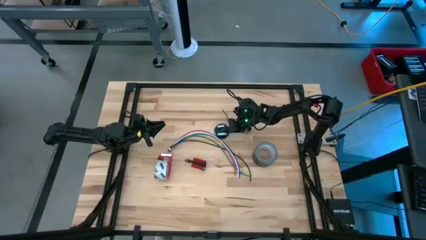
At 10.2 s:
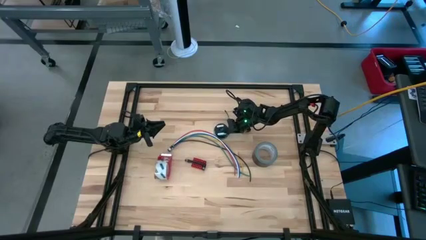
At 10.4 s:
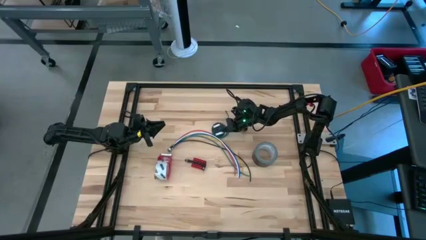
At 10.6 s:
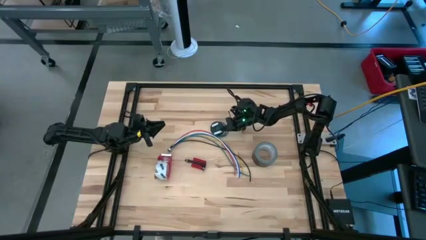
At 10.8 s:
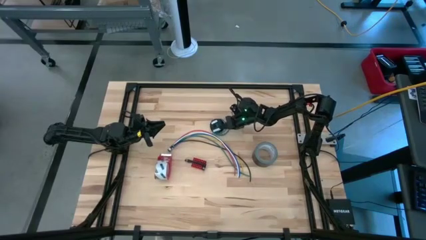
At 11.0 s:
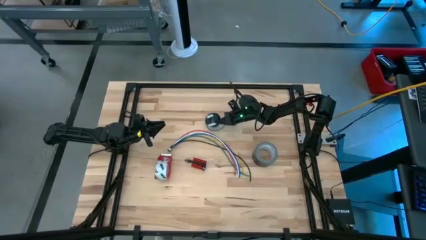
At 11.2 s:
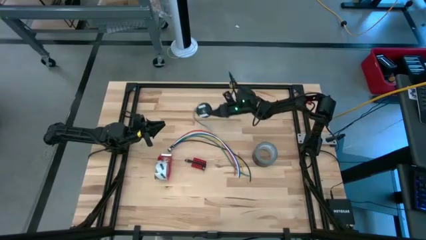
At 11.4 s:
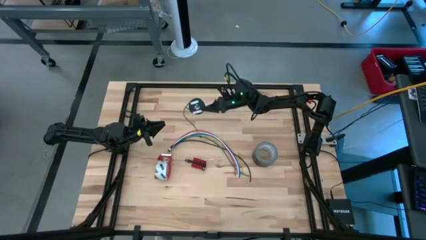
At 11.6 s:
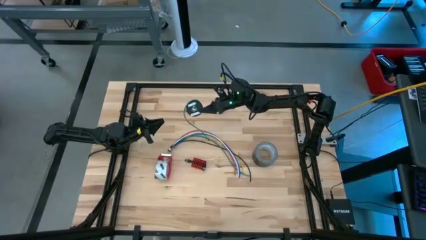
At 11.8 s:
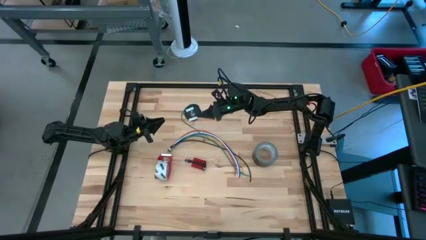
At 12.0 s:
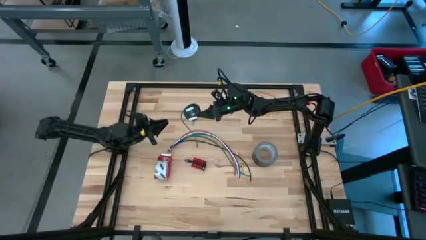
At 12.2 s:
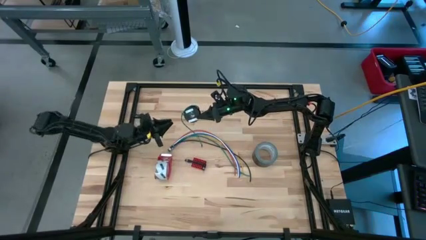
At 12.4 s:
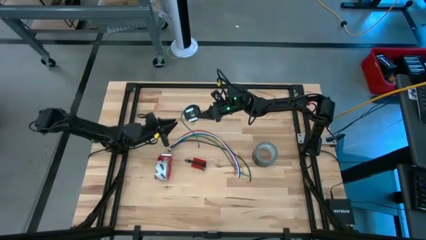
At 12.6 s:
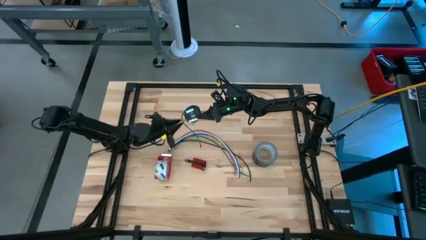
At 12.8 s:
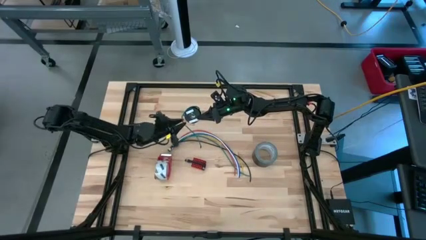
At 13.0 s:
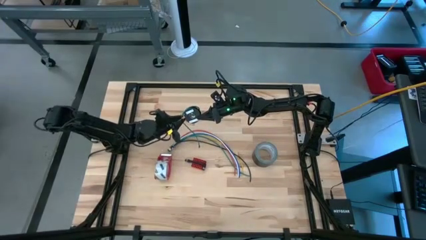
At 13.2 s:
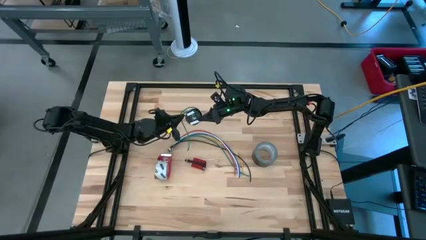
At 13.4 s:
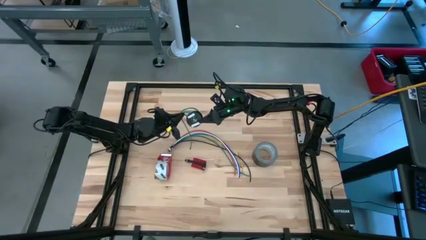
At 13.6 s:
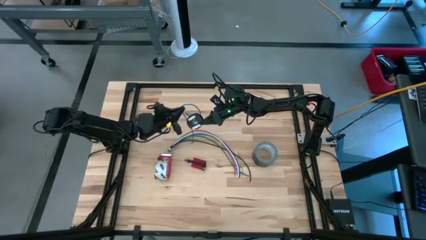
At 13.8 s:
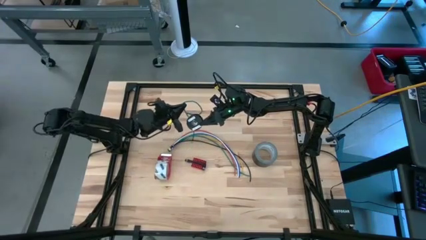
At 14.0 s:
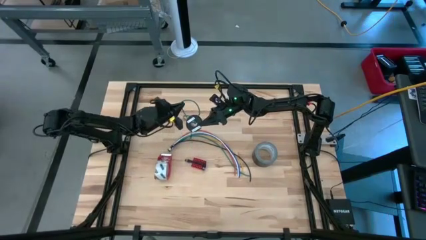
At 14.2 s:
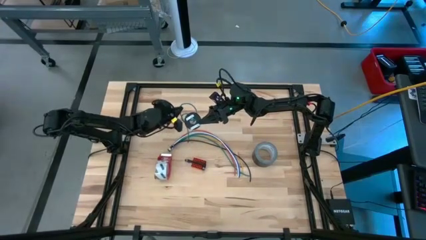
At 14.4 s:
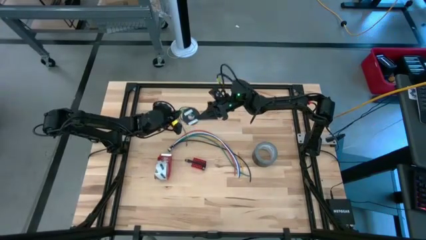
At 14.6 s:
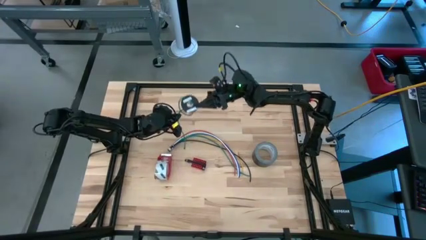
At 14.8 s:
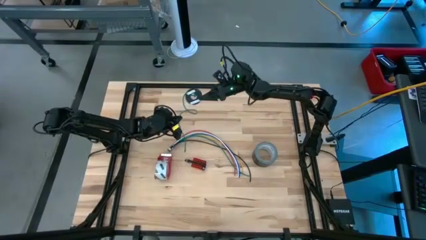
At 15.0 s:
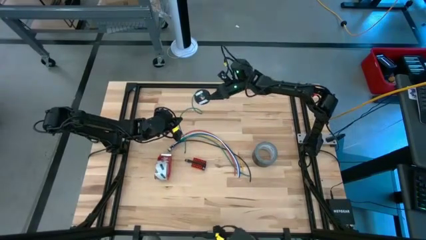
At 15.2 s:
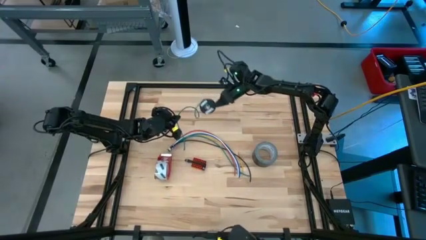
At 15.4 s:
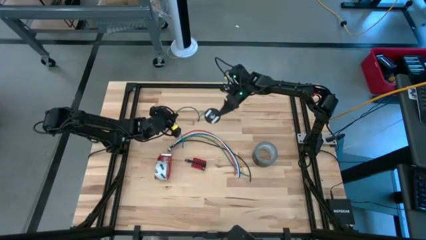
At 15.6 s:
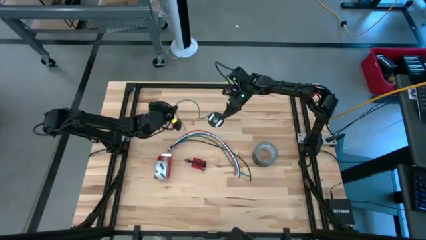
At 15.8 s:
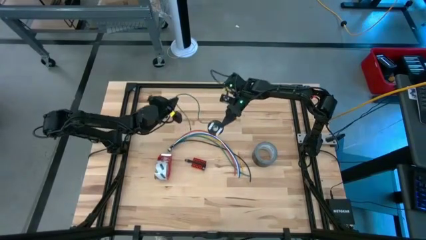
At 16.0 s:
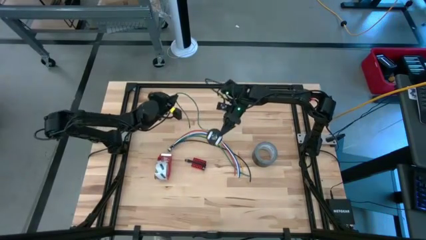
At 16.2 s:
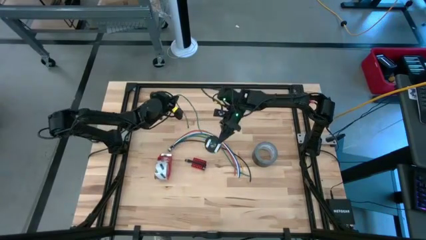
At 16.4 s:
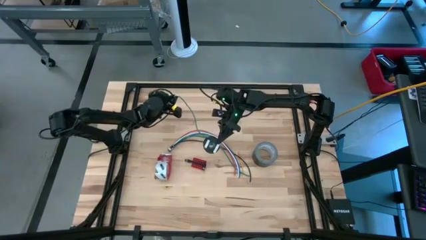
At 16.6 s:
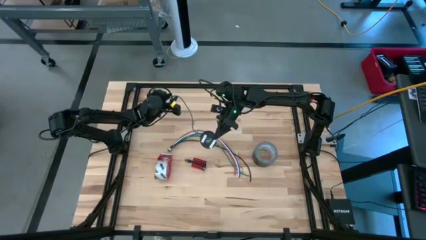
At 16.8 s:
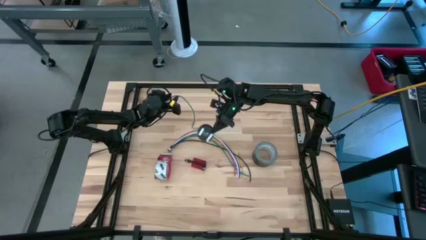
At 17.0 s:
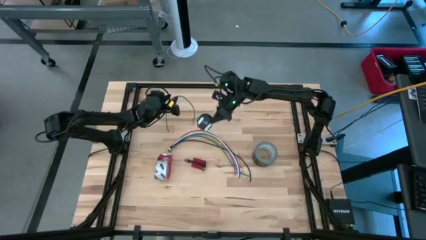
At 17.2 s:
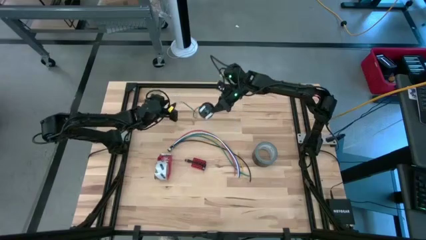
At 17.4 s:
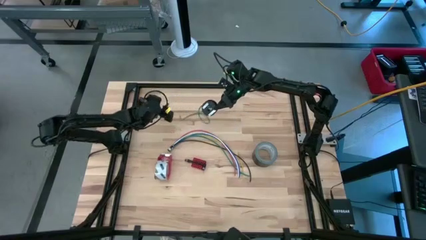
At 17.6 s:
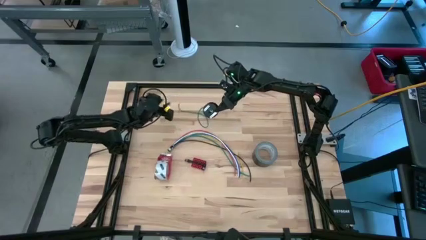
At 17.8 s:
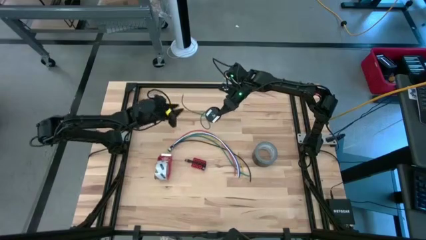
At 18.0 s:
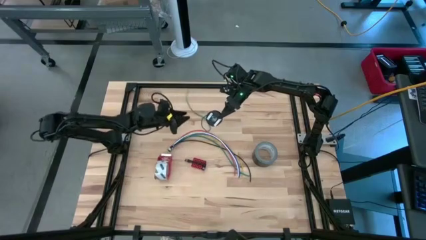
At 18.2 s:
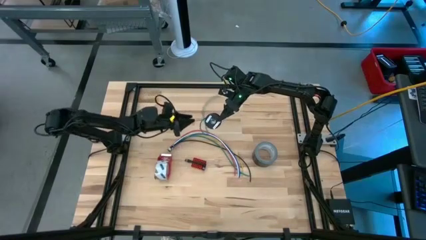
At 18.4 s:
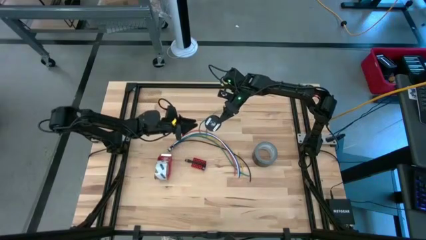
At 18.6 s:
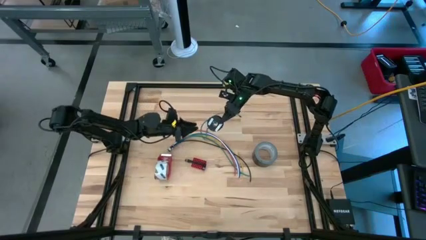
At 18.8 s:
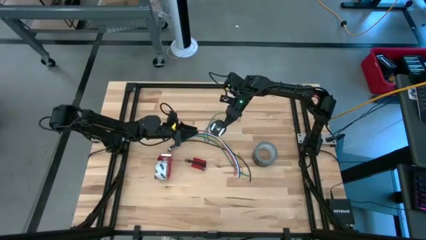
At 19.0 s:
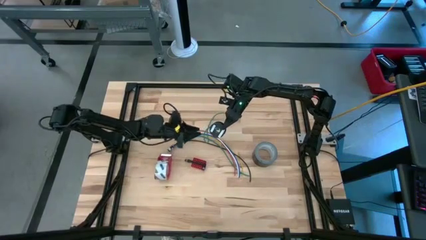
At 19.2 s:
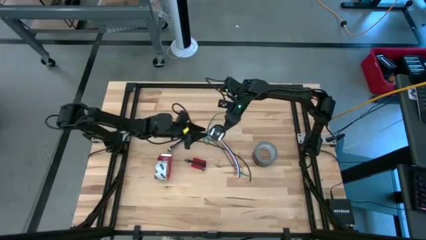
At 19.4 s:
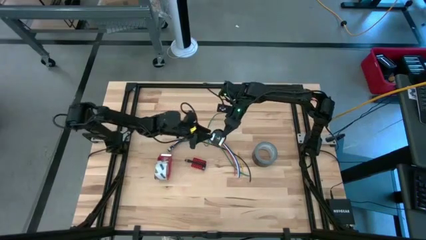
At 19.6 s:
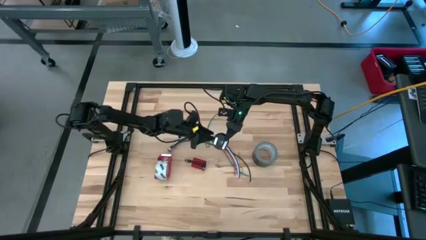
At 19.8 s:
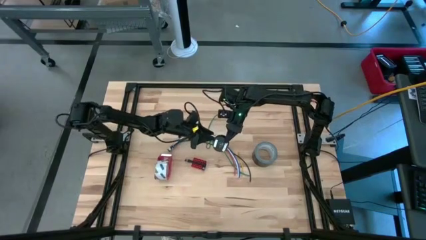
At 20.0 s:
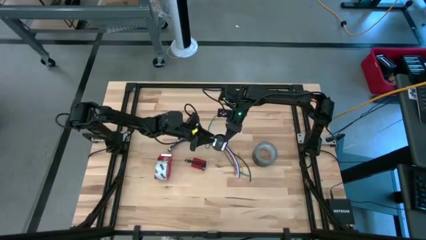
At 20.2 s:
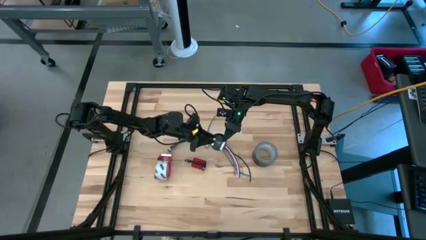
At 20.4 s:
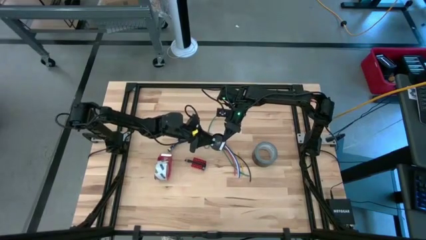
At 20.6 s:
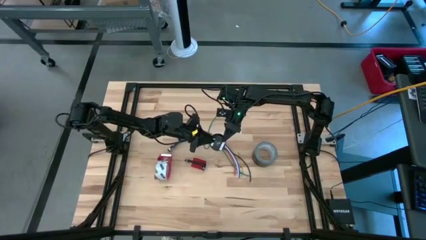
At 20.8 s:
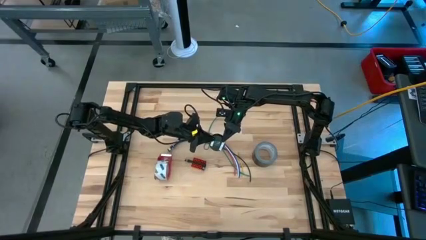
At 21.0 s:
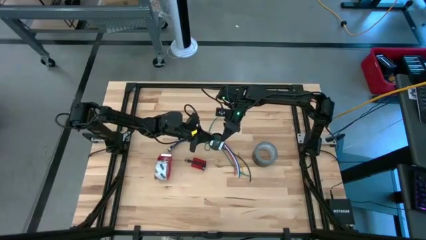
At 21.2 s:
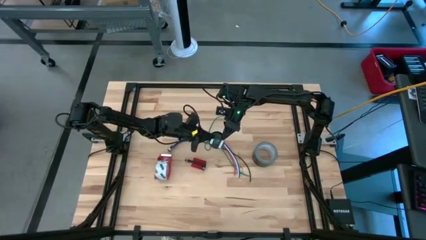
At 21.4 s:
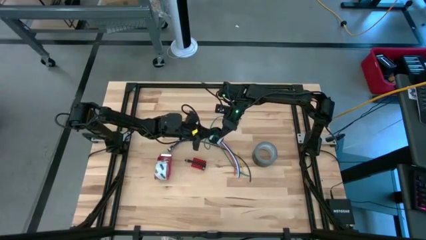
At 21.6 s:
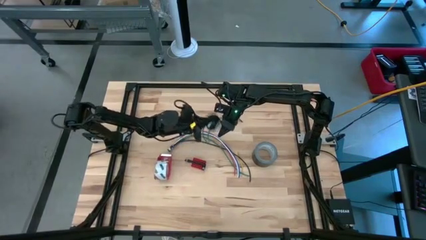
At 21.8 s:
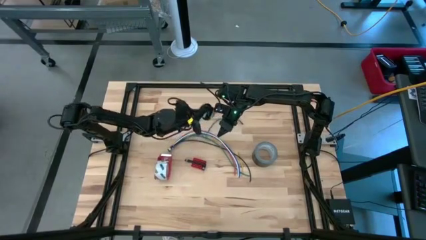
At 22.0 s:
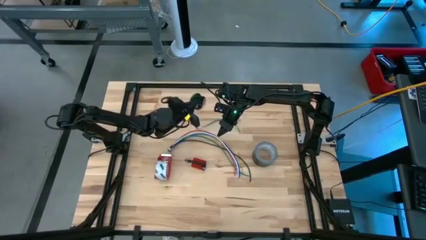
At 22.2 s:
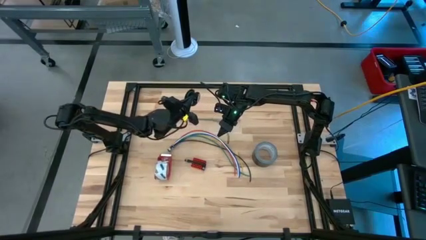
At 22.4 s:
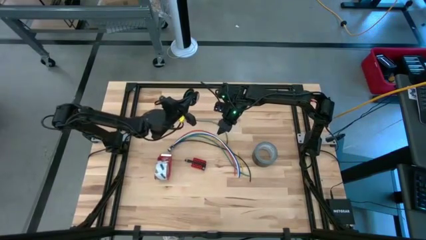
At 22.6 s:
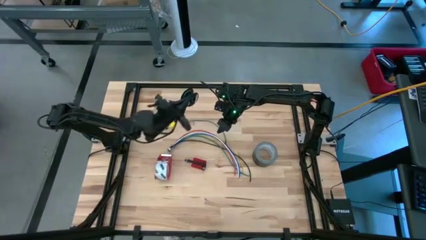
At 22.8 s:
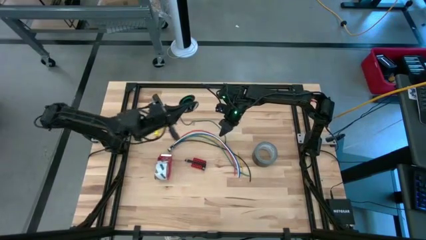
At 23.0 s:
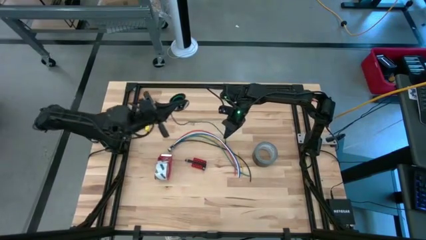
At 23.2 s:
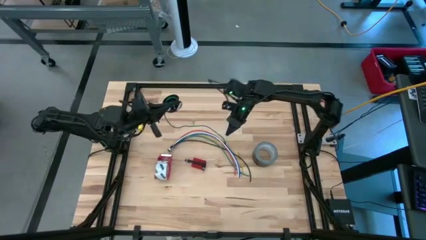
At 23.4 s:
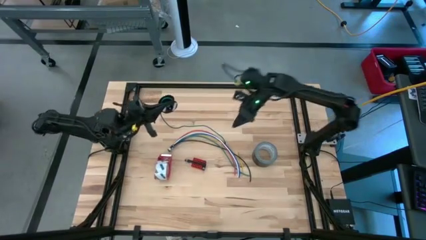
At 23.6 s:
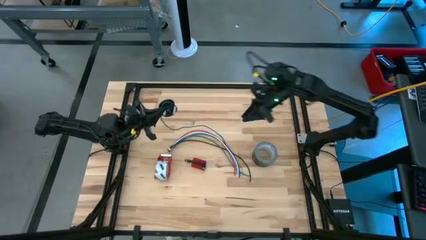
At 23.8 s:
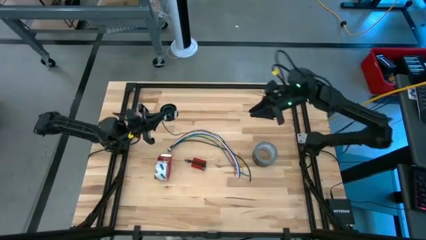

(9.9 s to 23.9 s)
Task: Coil cords
Uncoil the green wire from the black spool
